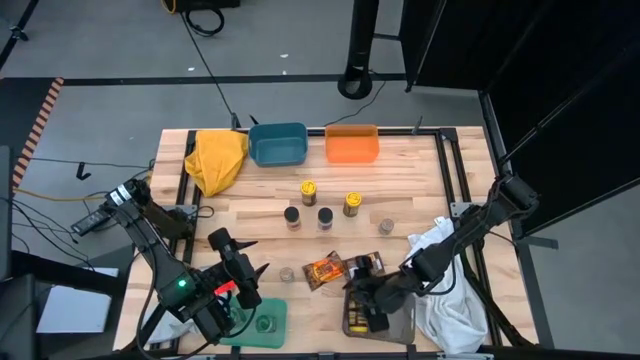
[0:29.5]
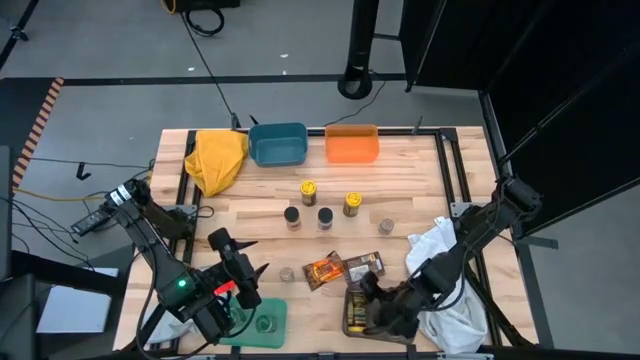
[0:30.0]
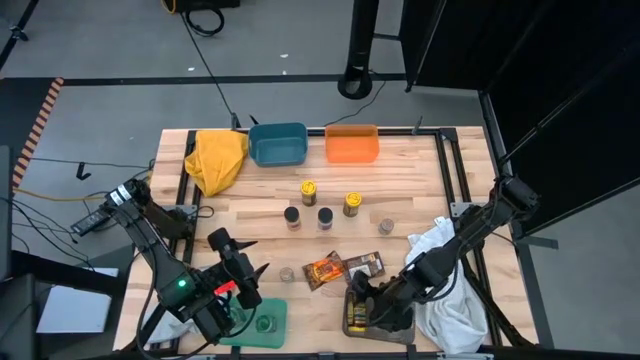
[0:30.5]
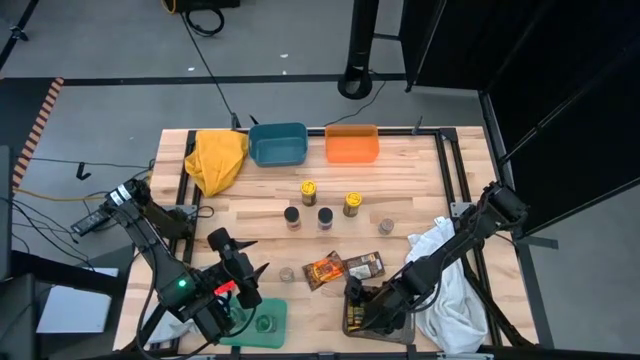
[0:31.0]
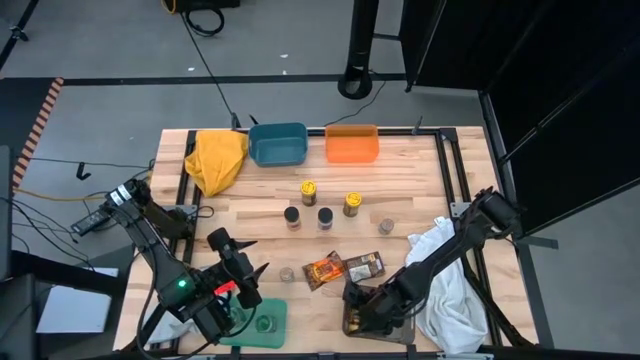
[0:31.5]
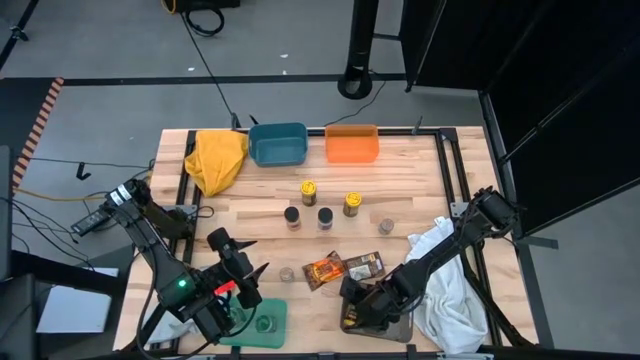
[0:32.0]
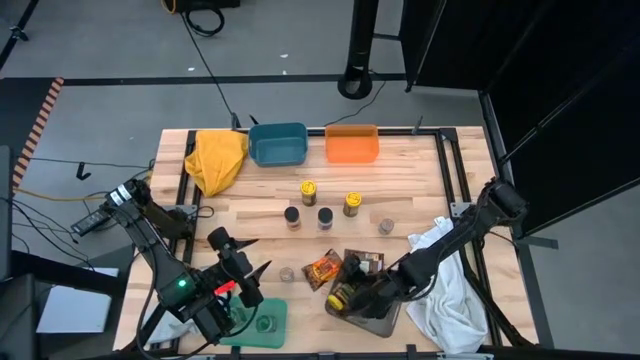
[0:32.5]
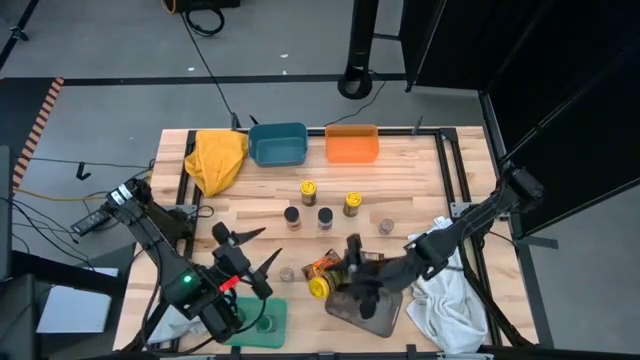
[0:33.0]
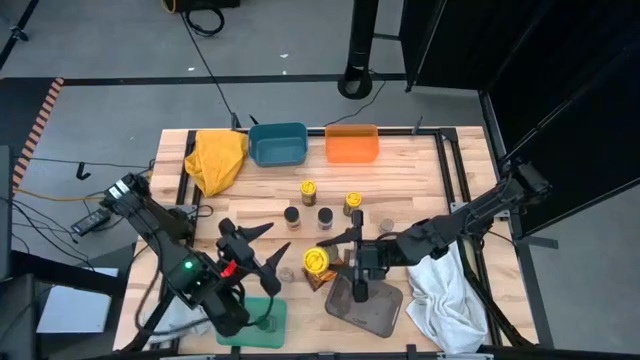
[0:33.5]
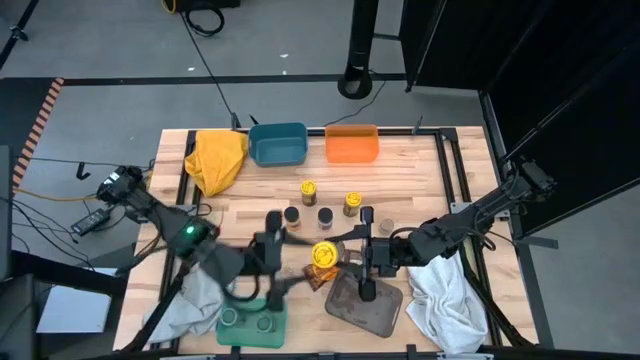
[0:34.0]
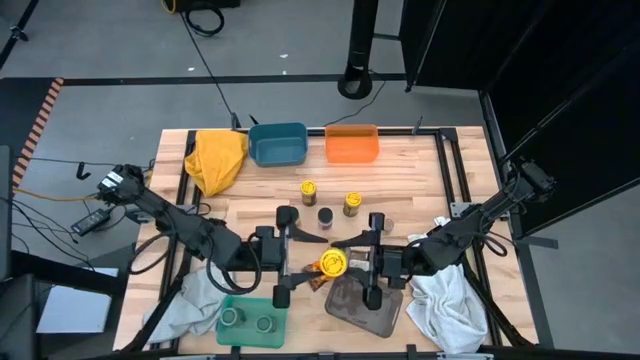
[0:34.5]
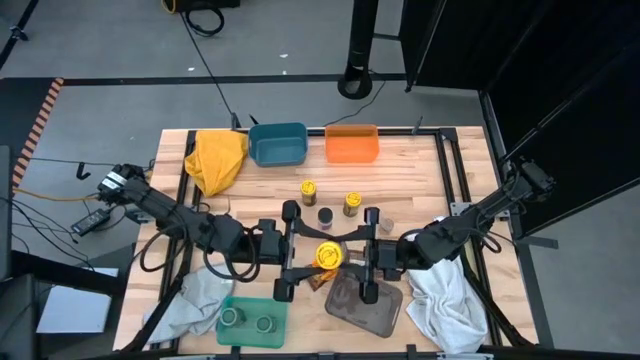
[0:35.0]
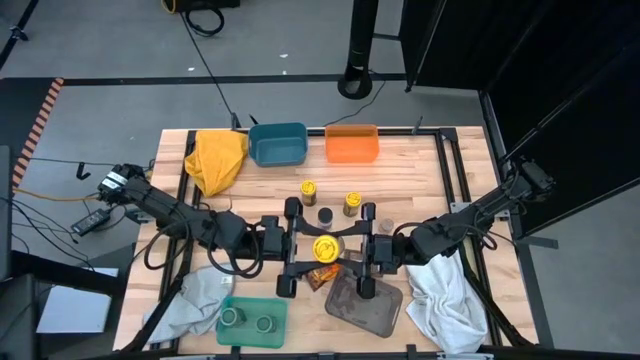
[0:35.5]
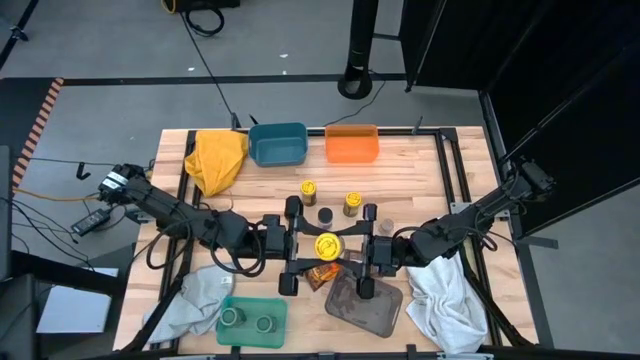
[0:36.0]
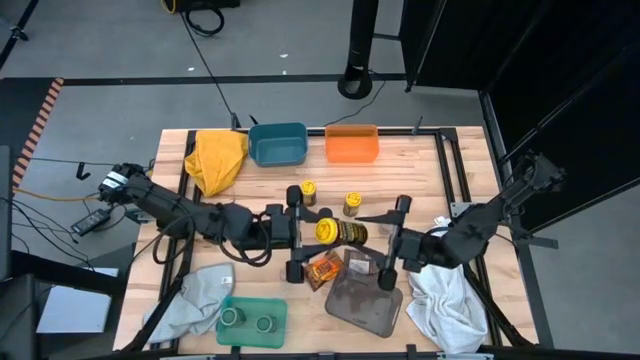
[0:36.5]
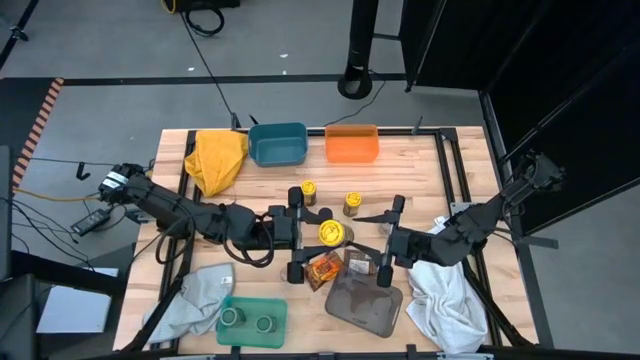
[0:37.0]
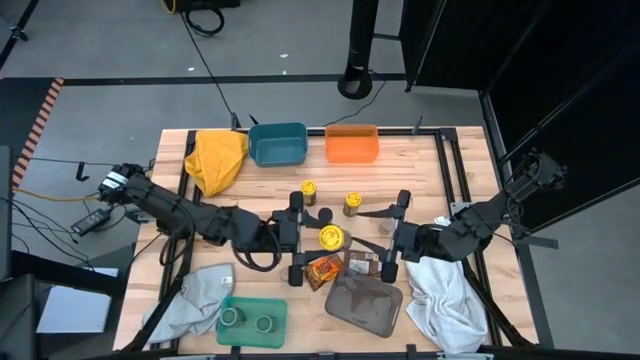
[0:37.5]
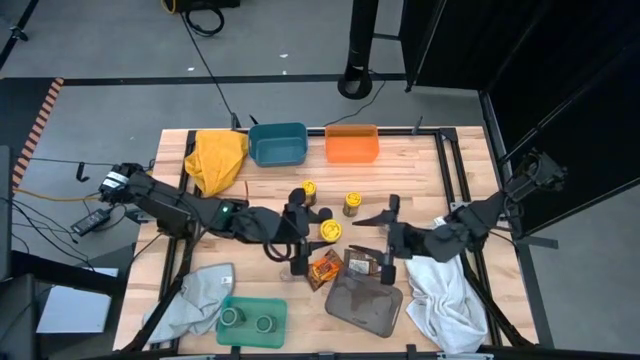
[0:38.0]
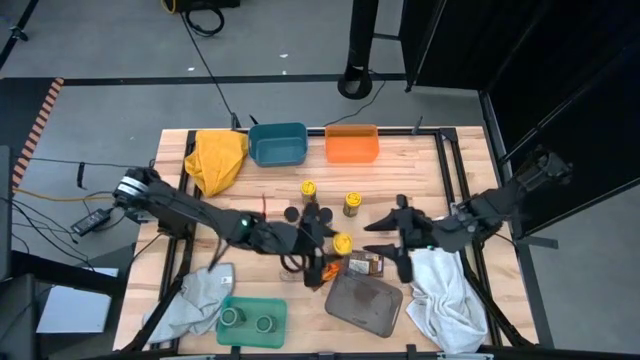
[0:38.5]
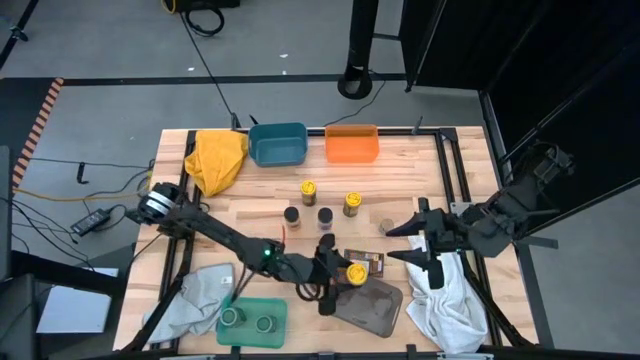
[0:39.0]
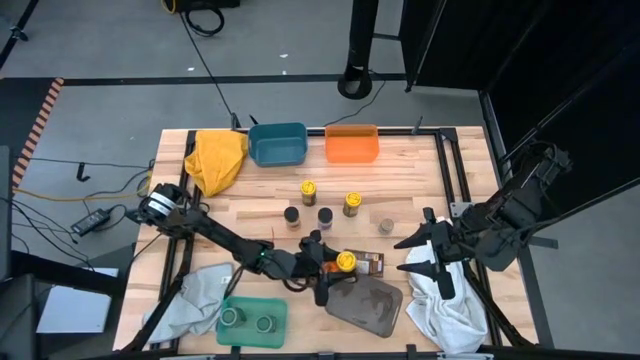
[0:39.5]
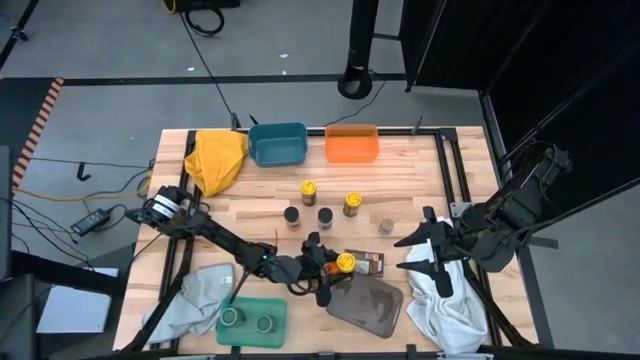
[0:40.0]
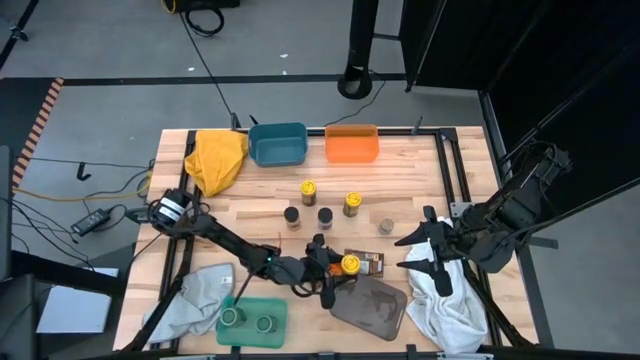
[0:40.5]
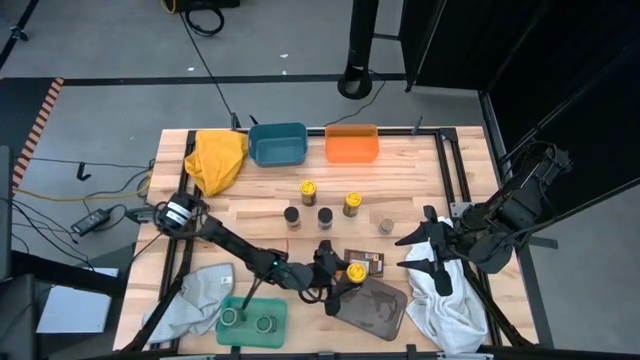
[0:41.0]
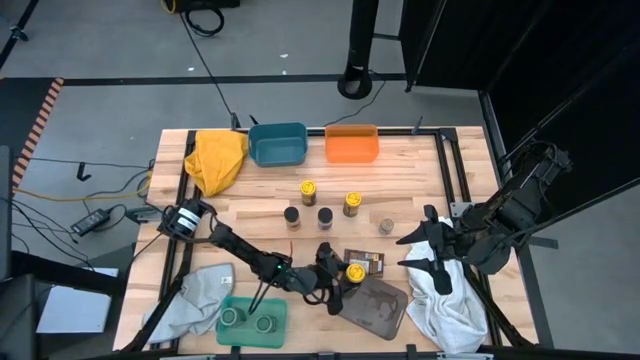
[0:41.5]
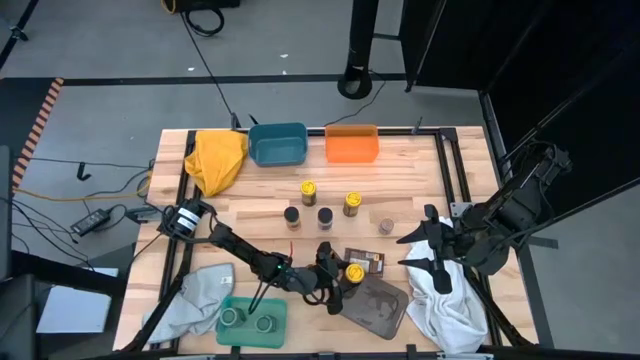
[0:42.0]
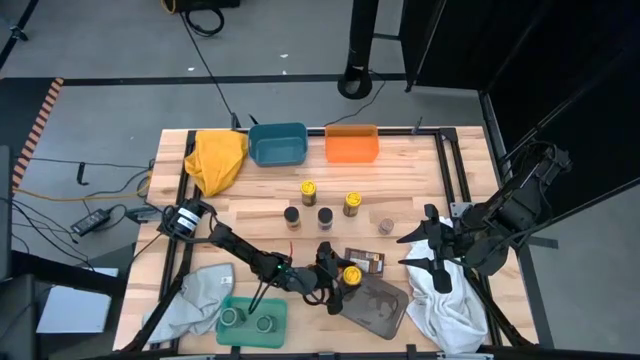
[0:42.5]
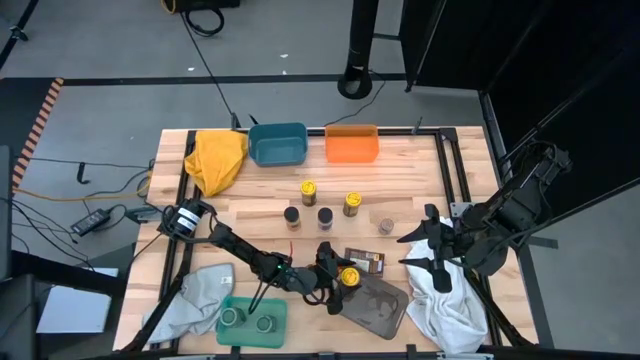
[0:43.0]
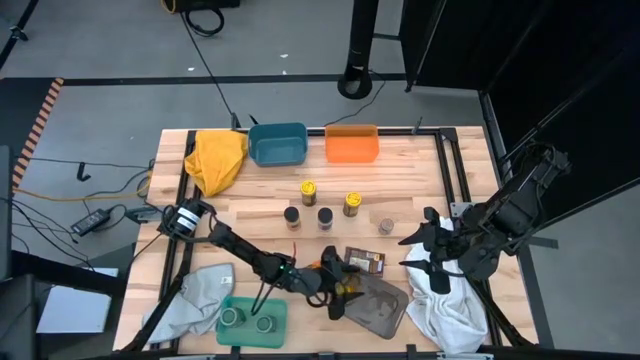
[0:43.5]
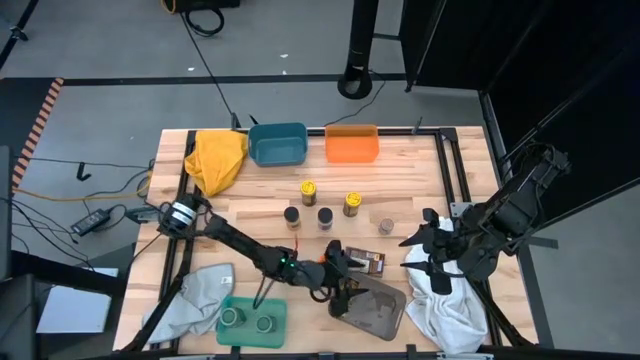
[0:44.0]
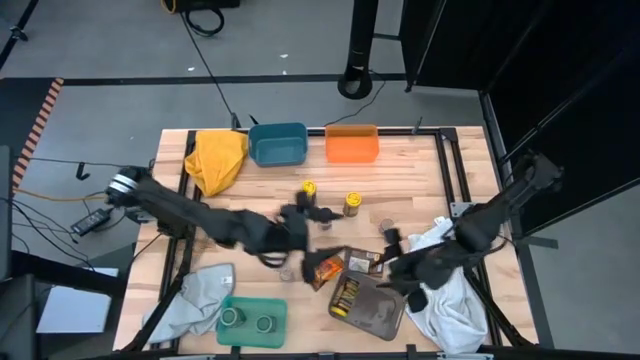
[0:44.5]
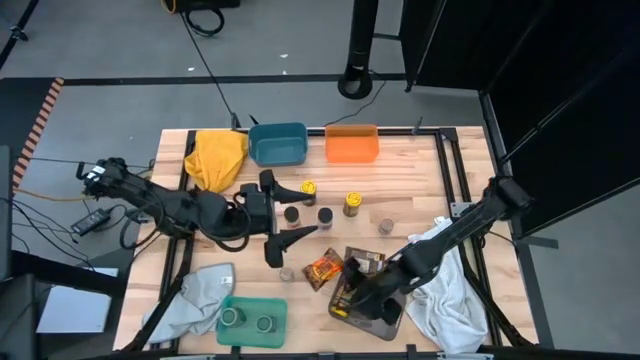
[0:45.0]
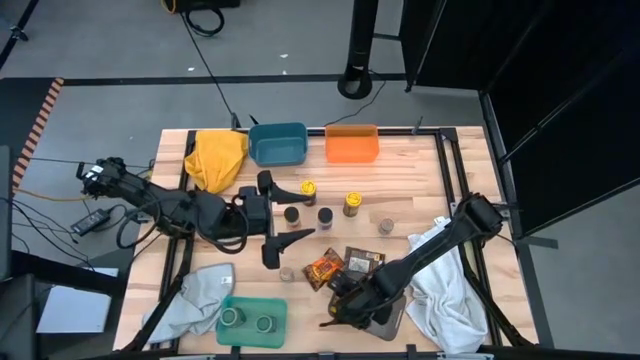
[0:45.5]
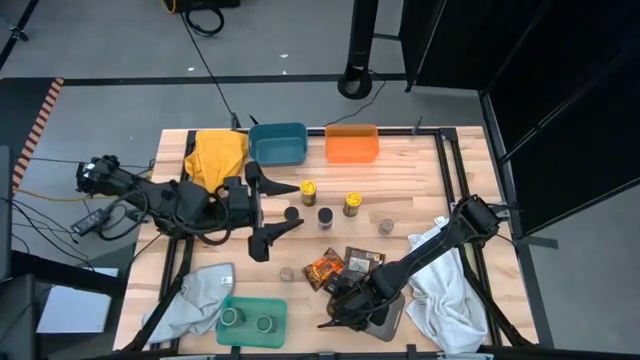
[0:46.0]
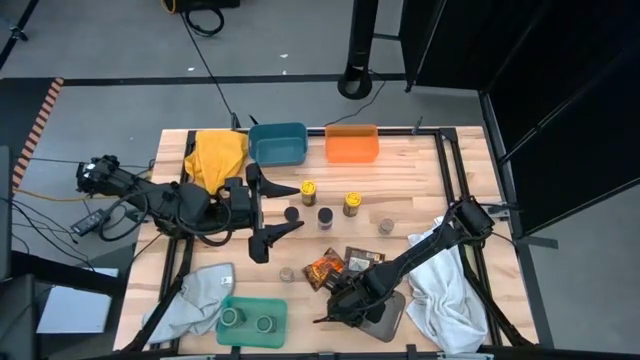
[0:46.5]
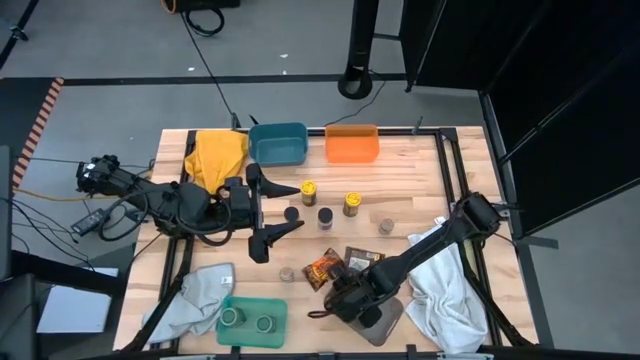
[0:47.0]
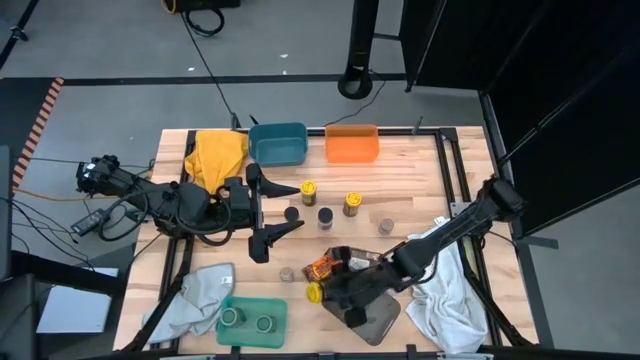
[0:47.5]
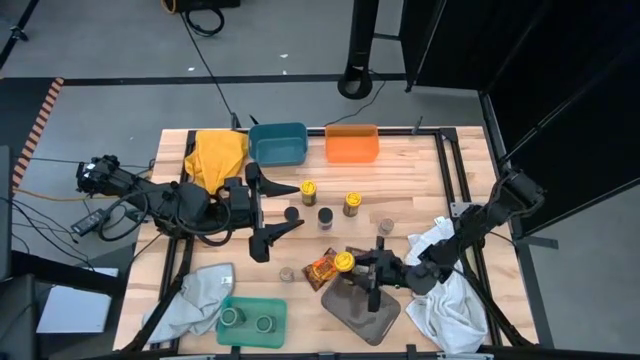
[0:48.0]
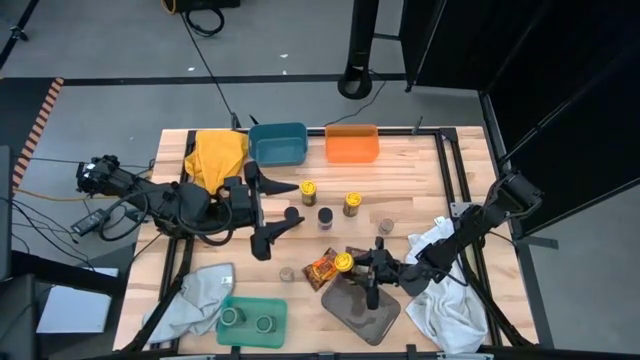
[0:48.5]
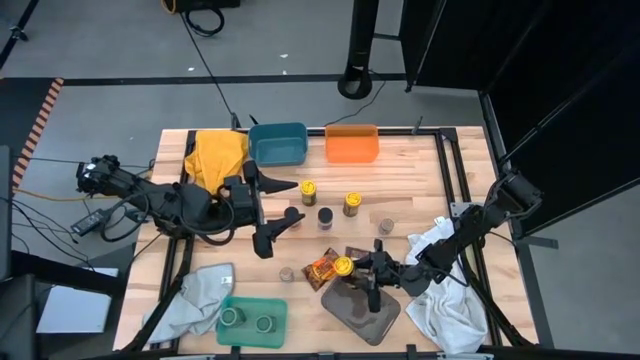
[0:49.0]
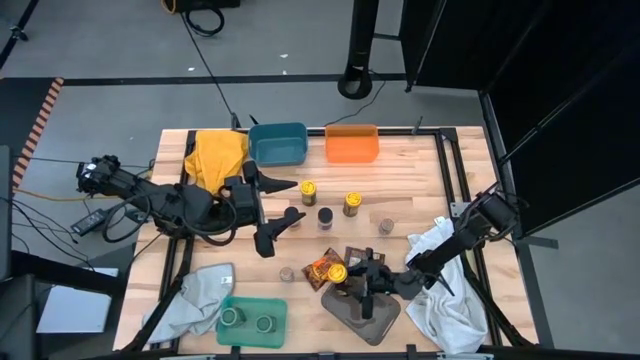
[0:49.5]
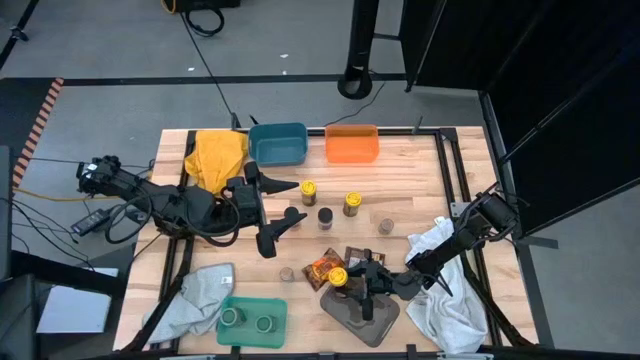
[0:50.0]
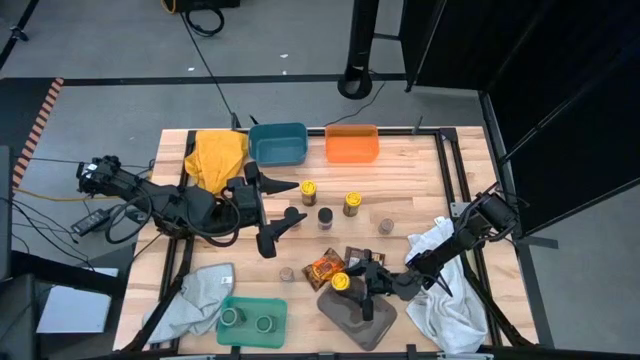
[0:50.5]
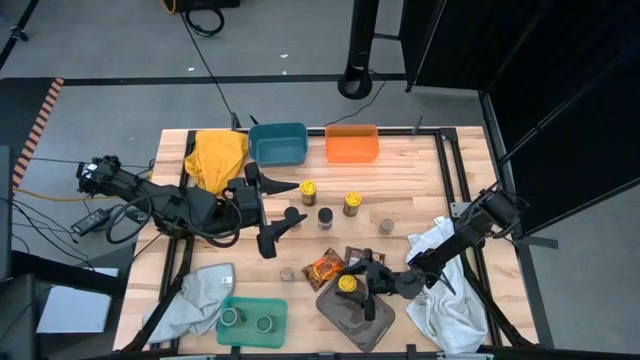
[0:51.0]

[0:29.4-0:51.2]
Task: Sort spices by type
Put the bottom right yellow seasoning bottle into the black bin
